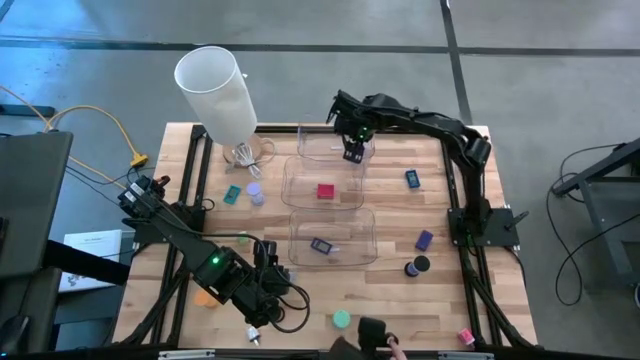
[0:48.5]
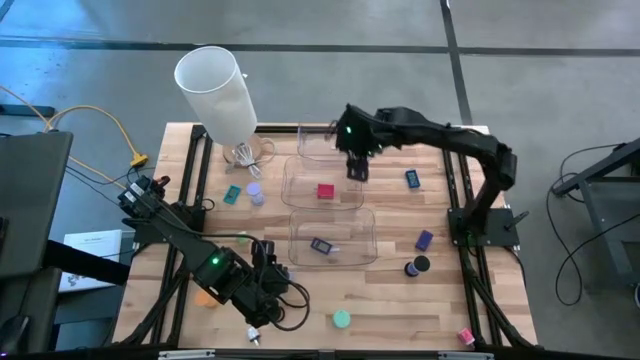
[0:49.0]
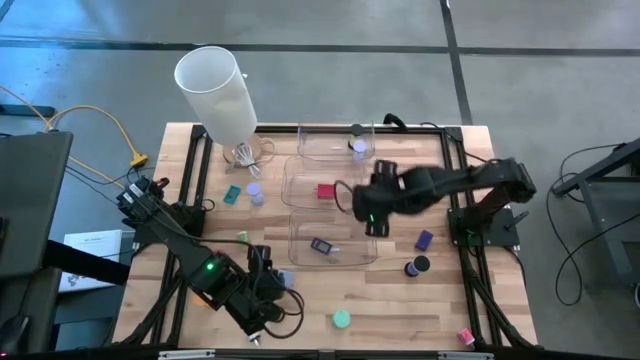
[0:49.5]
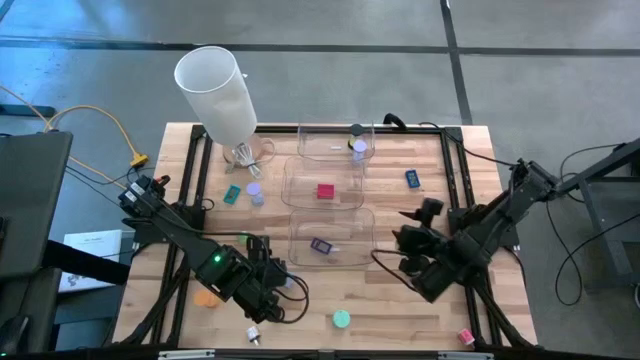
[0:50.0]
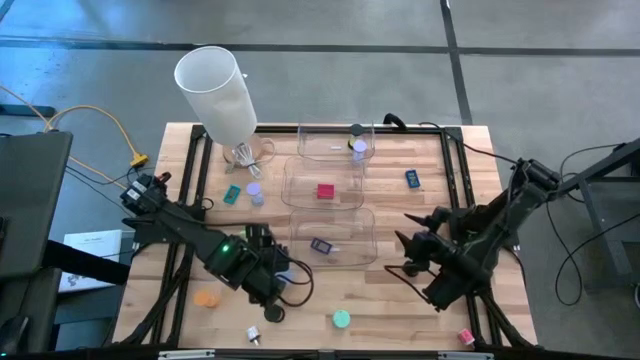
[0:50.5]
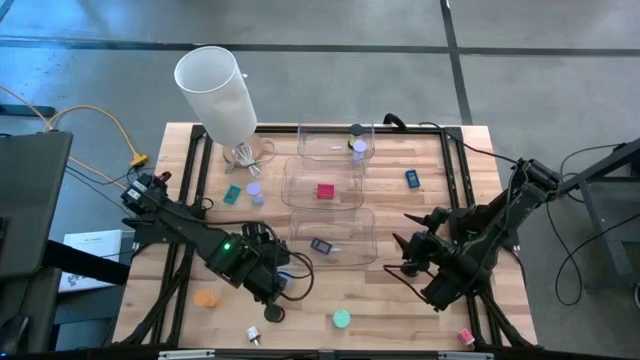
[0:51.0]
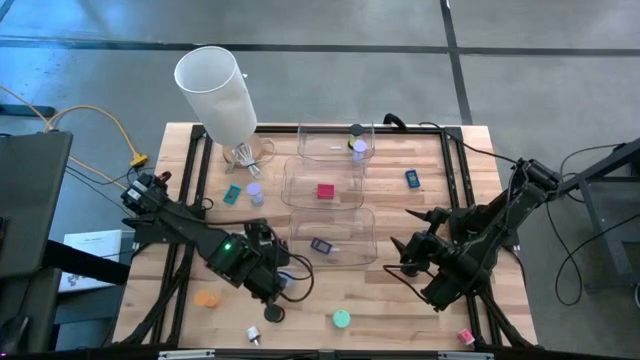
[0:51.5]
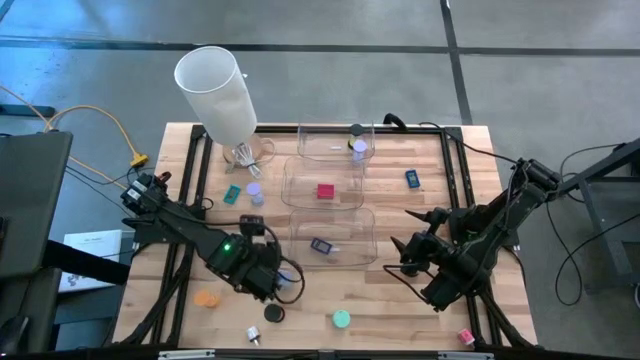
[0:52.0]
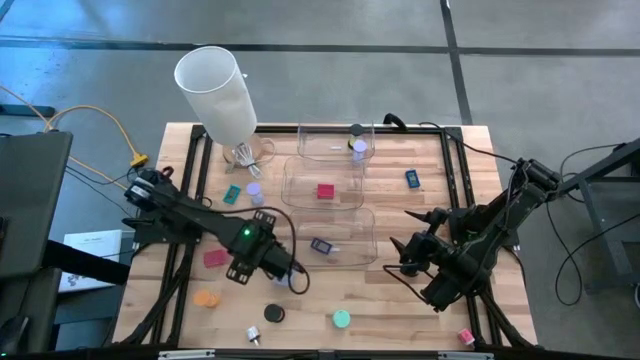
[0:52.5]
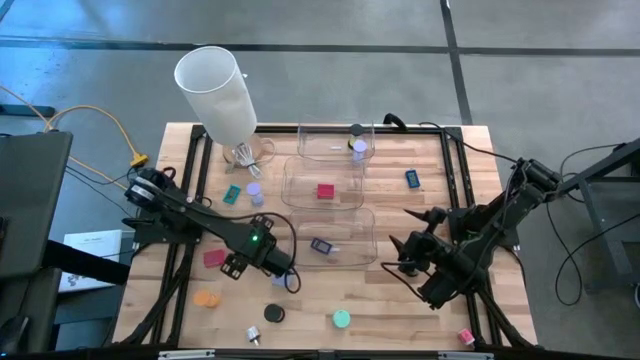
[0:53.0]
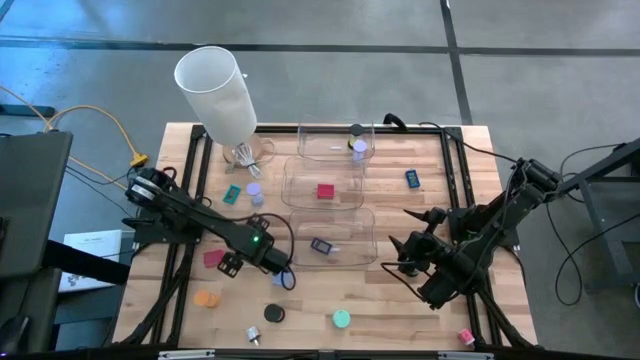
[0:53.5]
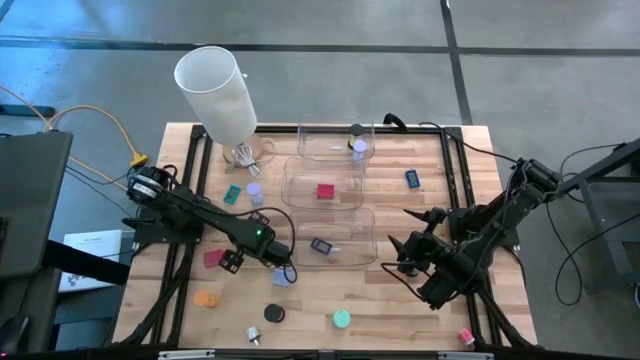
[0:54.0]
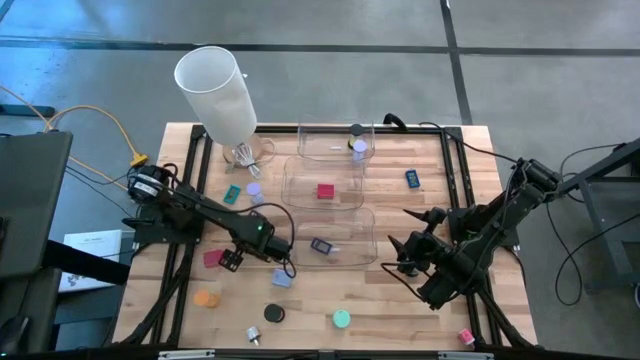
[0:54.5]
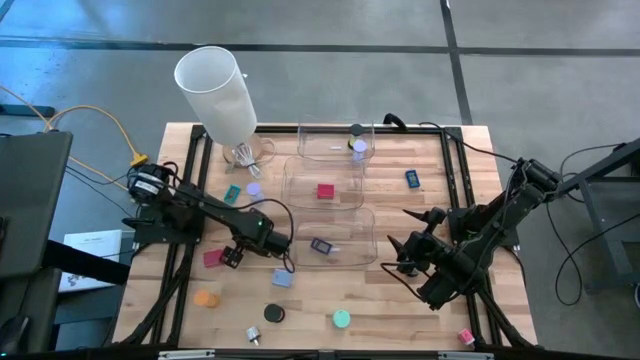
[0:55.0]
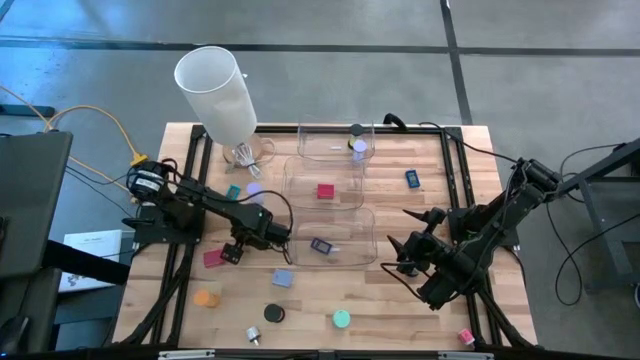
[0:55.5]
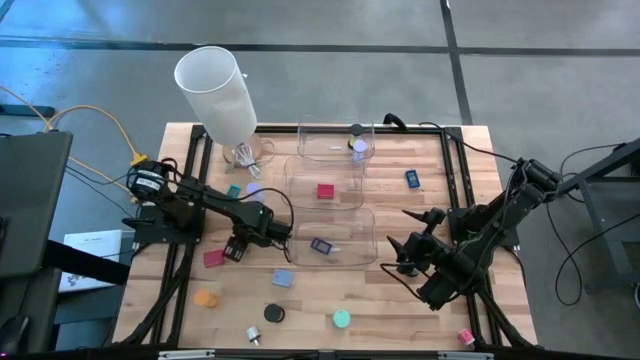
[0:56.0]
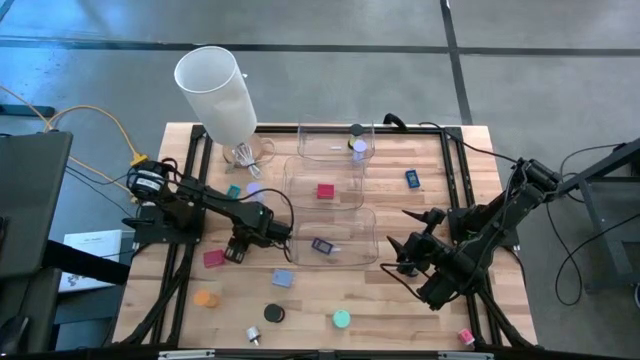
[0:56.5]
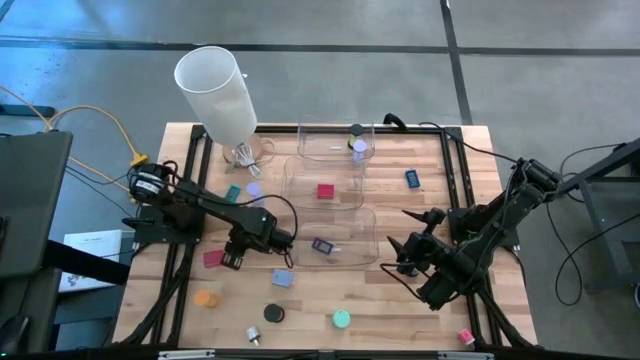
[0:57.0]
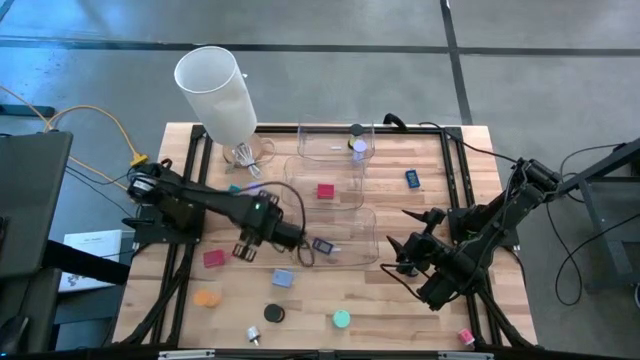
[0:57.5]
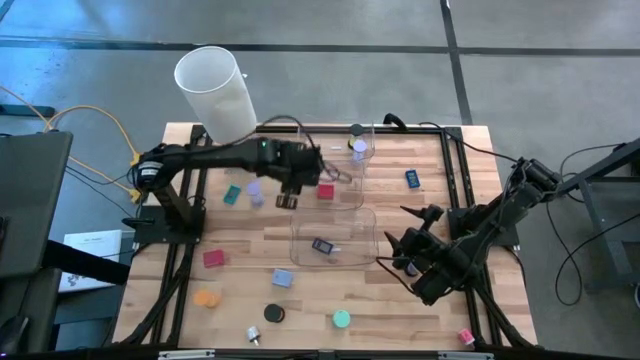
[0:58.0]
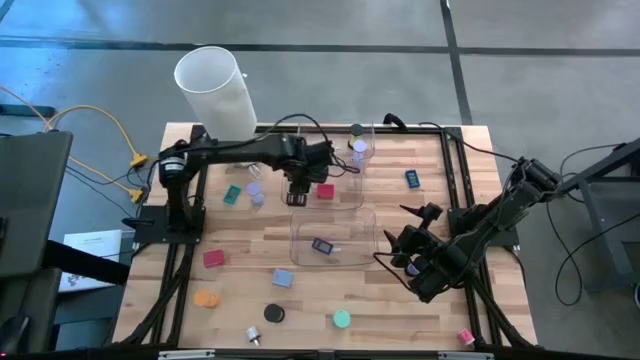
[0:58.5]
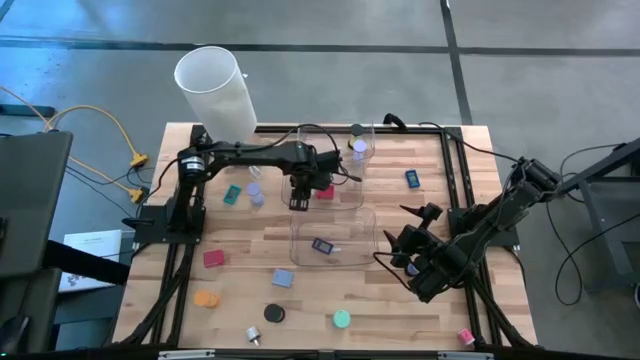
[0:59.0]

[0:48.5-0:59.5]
Task: Pick & Place Office items
Put the small green charger adapter into the middle transparent bin

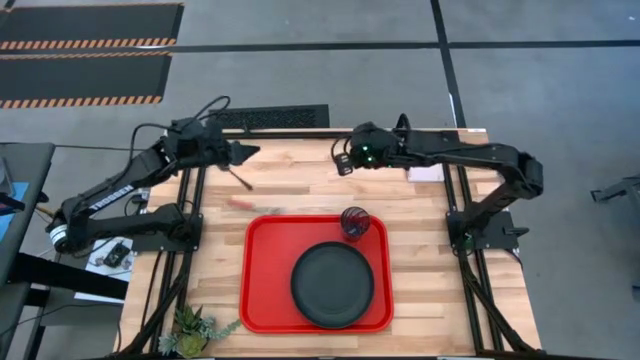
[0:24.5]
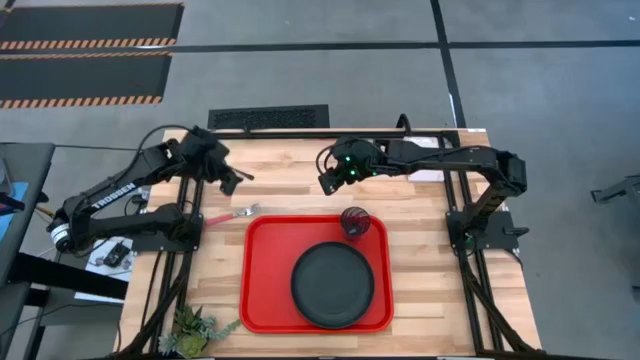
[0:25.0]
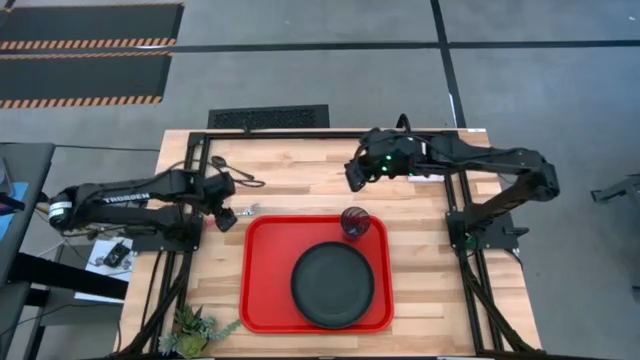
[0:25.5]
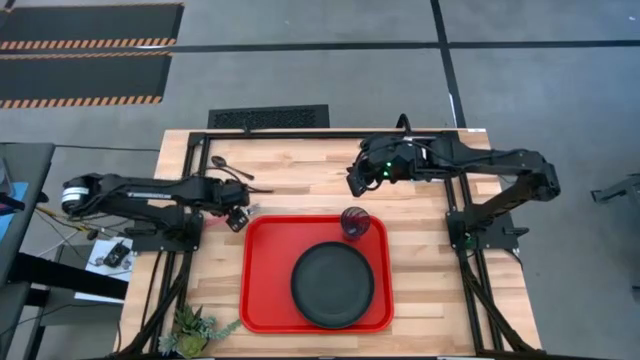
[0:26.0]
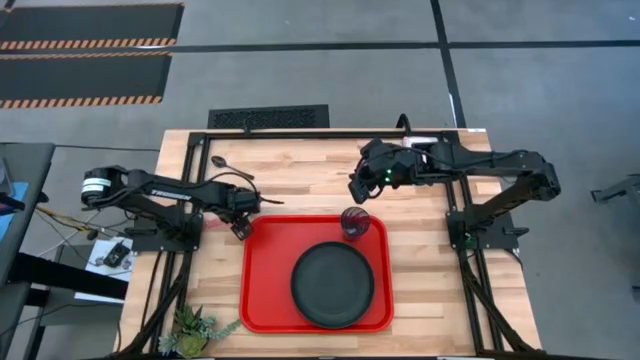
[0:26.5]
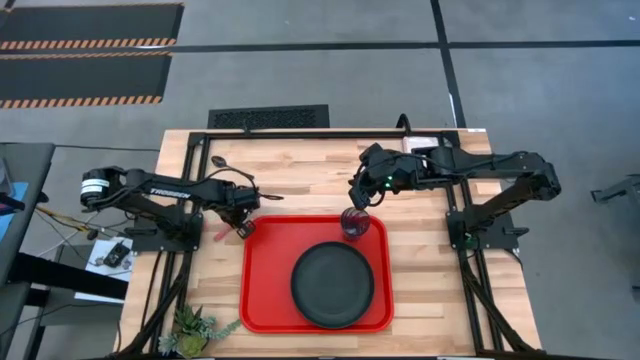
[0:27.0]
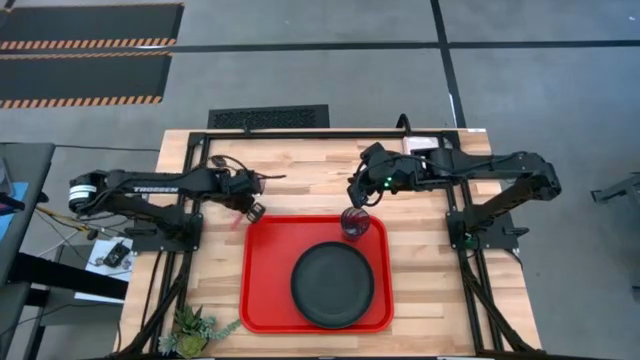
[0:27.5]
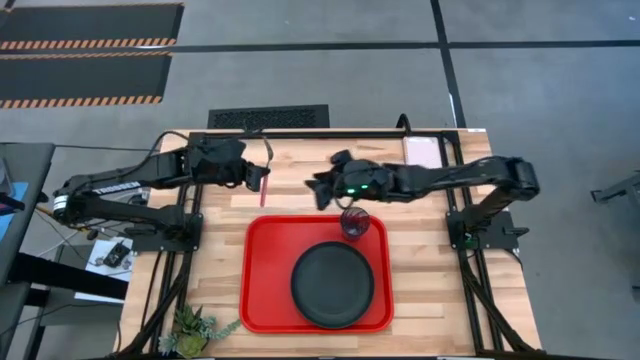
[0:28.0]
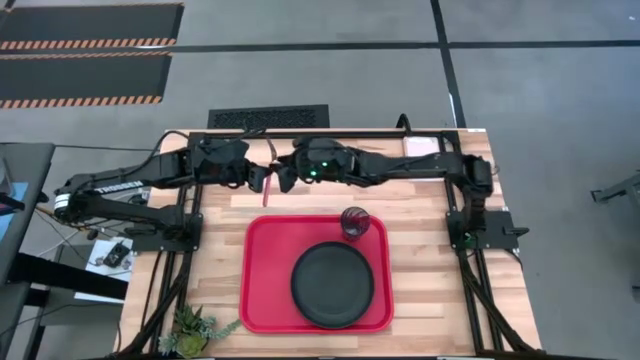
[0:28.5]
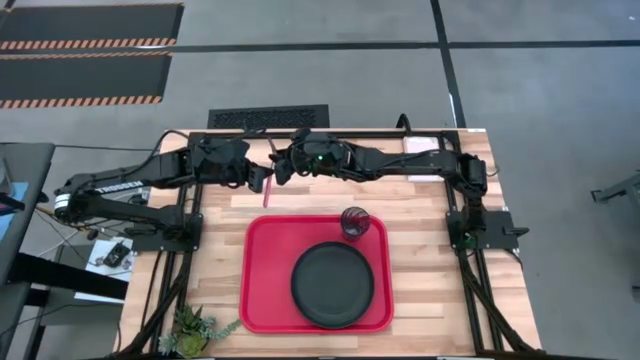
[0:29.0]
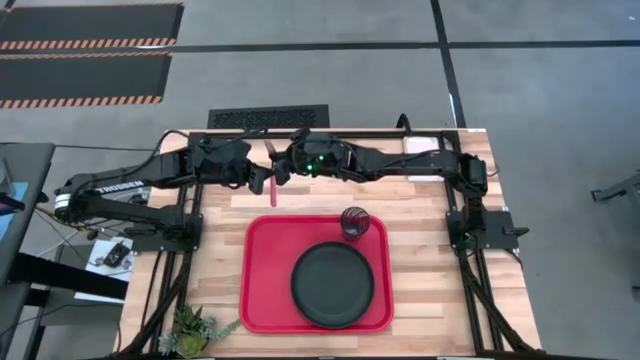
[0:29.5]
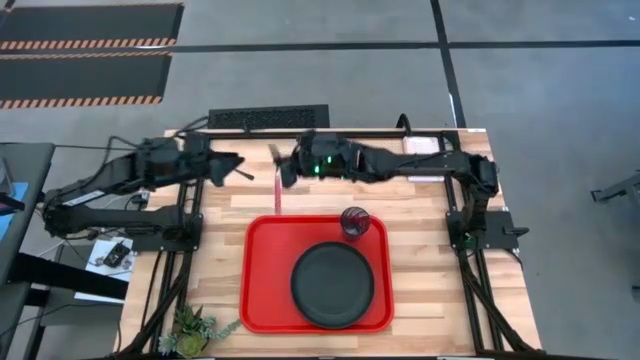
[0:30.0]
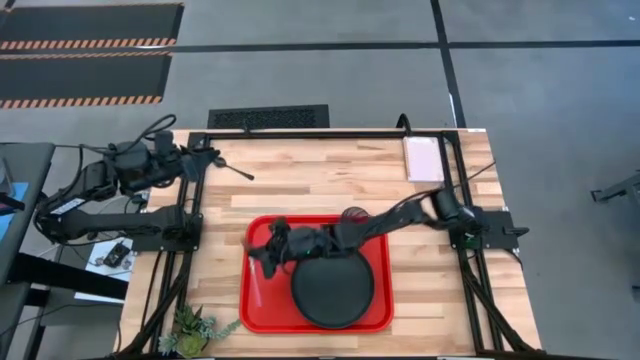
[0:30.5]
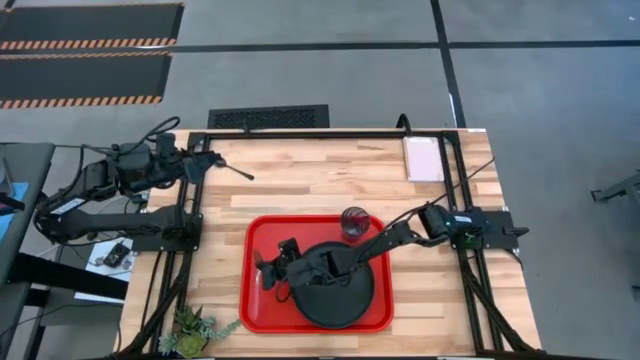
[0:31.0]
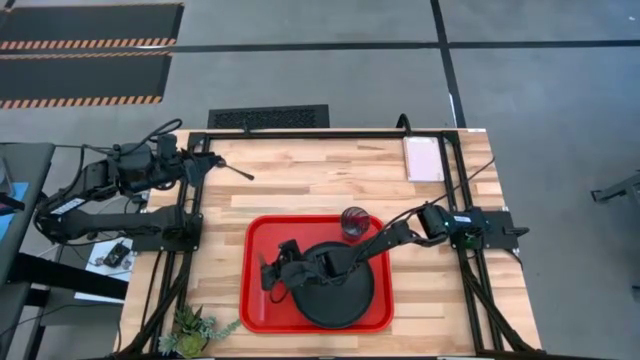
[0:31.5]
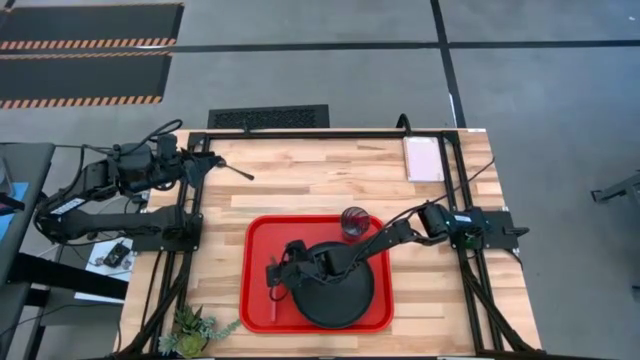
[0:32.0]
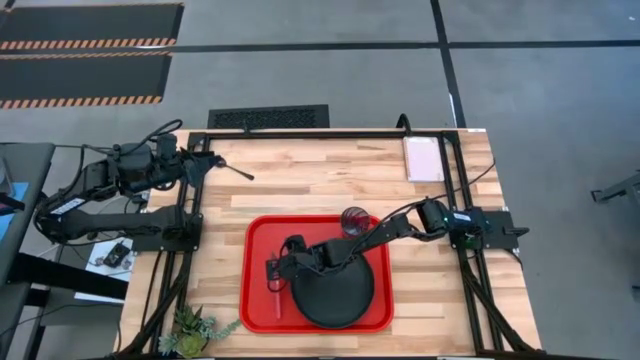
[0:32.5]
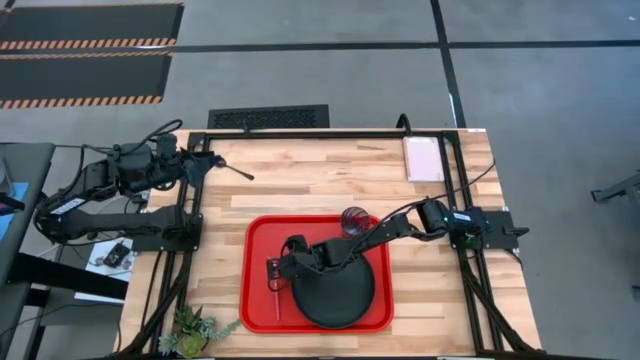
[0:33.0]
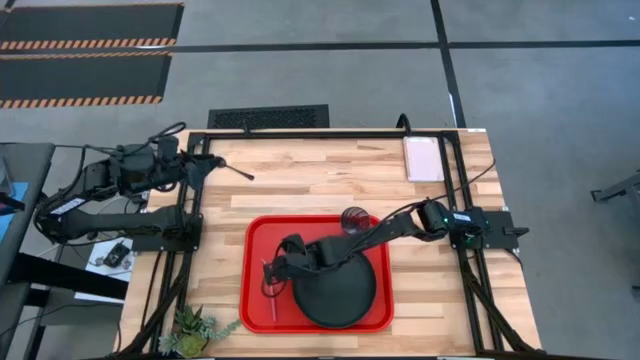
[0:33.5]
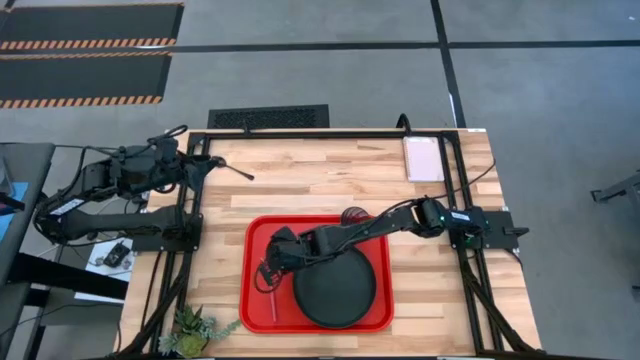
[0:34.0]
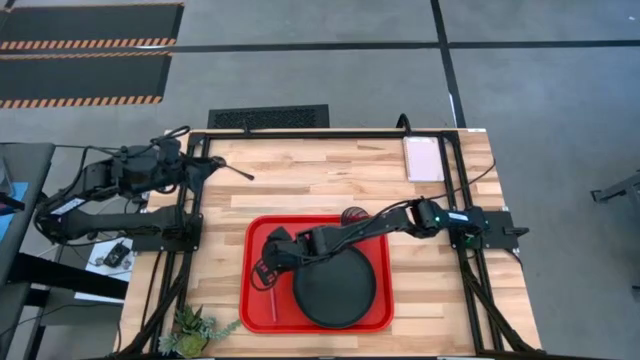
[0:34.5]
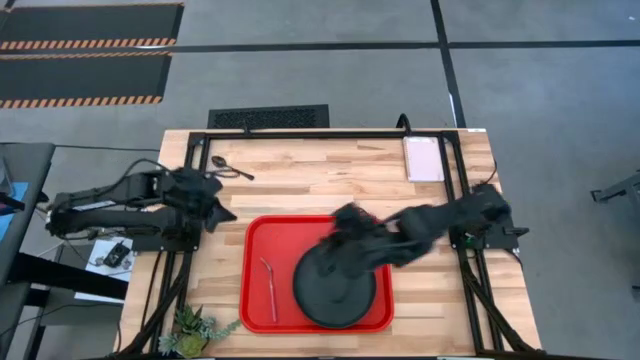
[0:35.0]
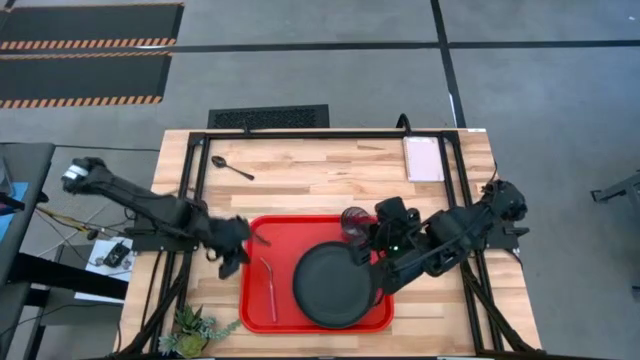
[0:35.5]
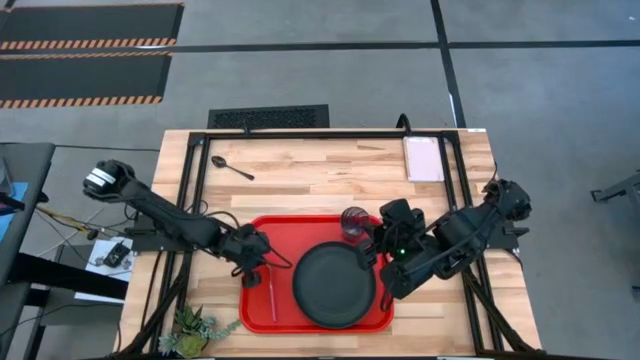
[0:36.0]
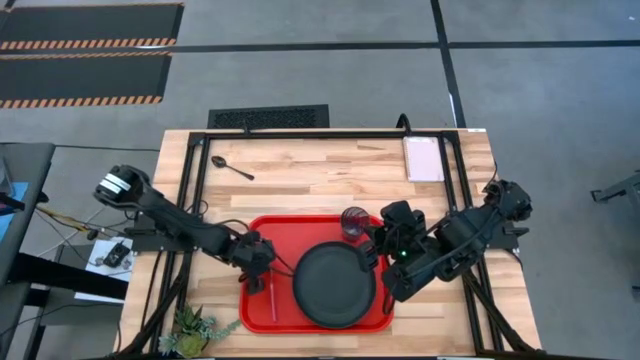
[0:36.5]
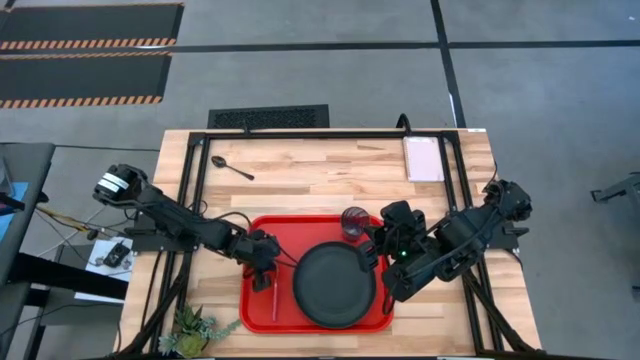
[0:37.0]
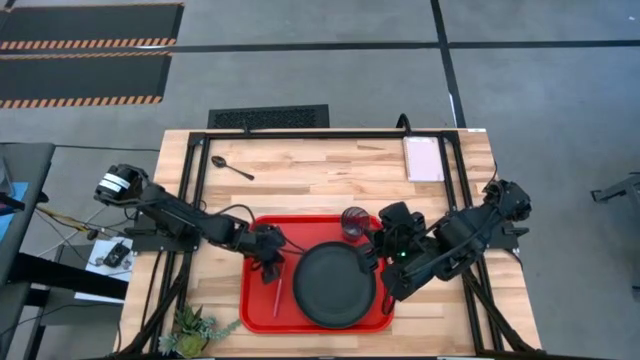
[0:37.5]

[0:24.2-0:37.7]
Task: Pick and place plate/cup/fork/spoon on tray
Put the pink fork into the red serving tray
